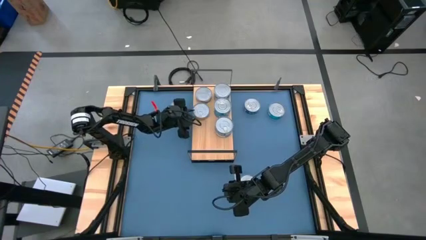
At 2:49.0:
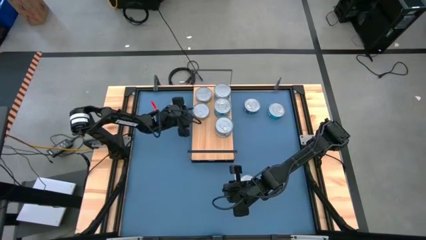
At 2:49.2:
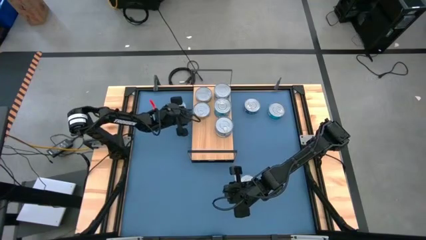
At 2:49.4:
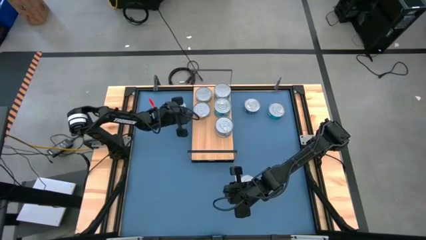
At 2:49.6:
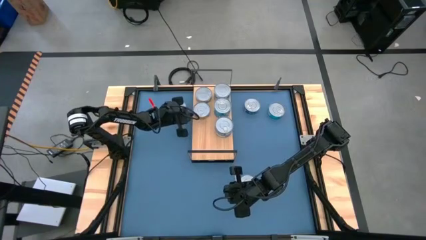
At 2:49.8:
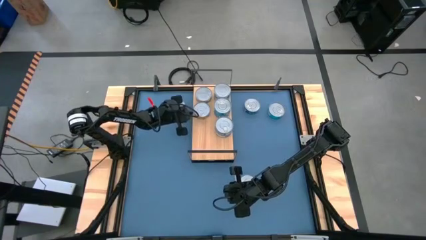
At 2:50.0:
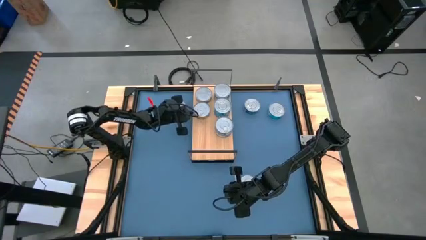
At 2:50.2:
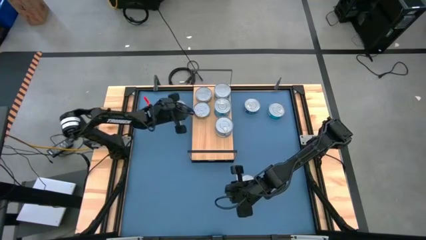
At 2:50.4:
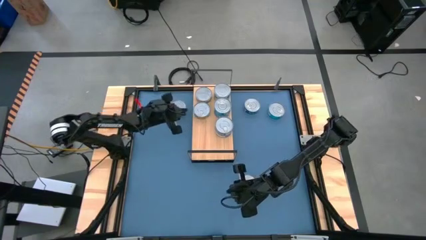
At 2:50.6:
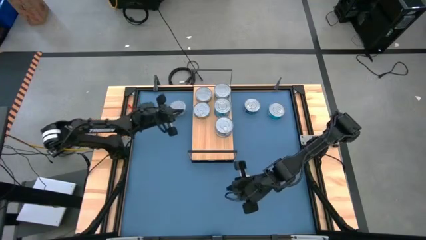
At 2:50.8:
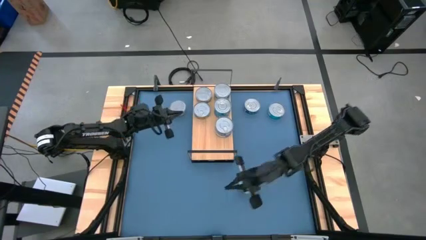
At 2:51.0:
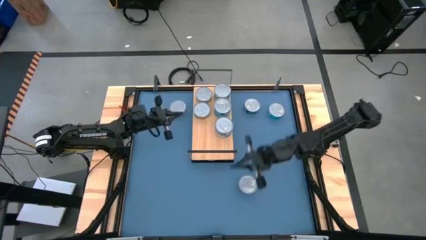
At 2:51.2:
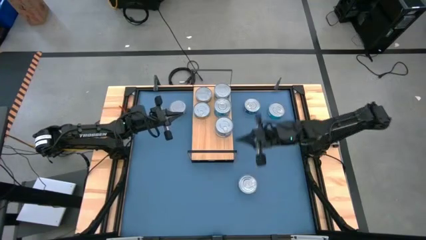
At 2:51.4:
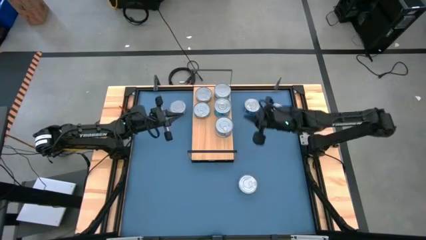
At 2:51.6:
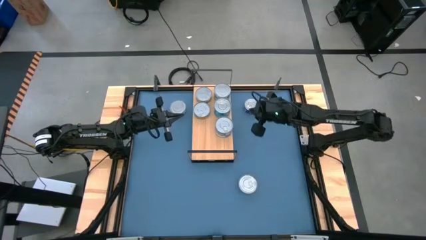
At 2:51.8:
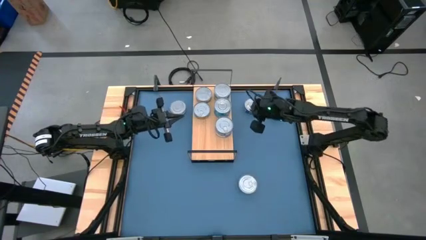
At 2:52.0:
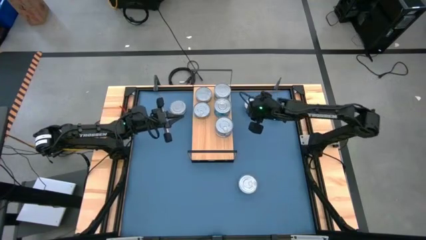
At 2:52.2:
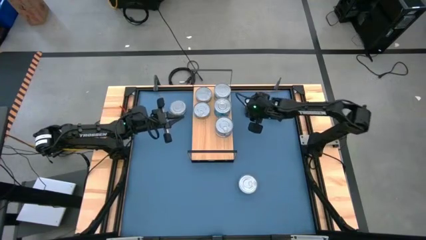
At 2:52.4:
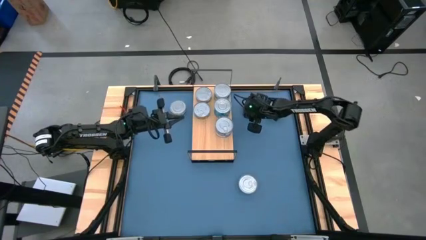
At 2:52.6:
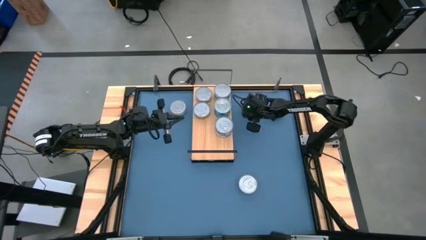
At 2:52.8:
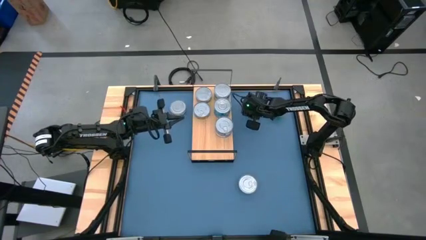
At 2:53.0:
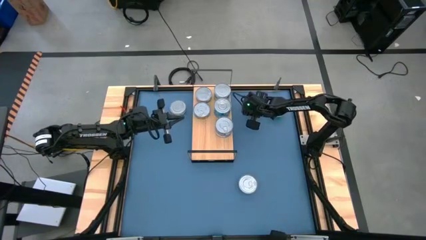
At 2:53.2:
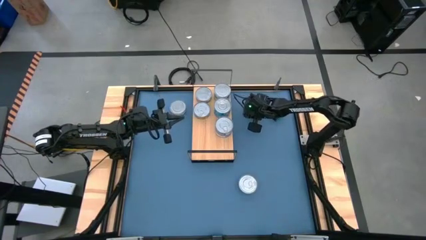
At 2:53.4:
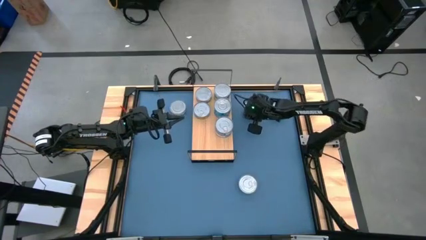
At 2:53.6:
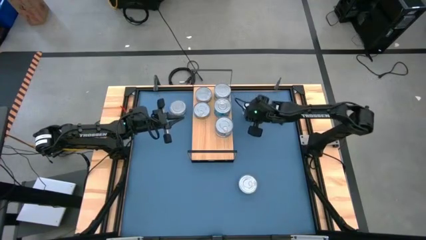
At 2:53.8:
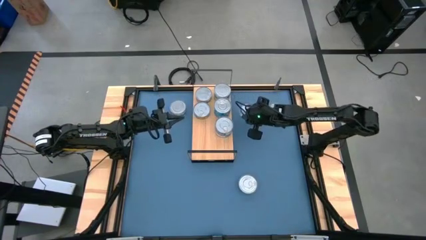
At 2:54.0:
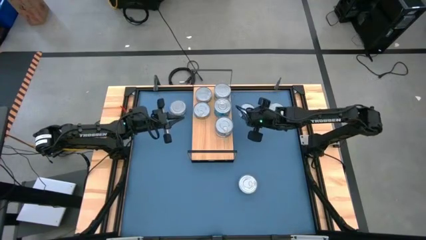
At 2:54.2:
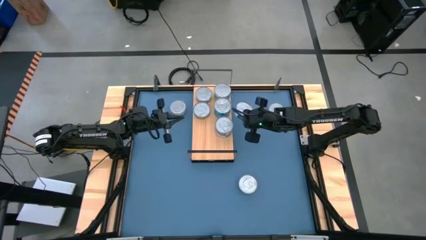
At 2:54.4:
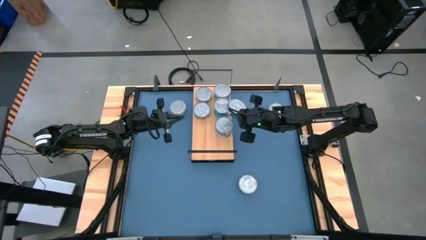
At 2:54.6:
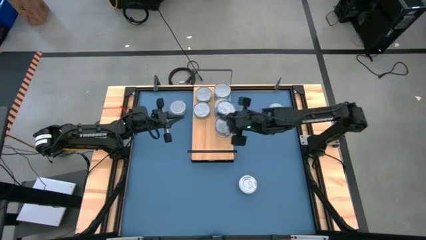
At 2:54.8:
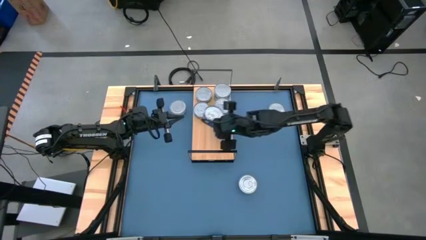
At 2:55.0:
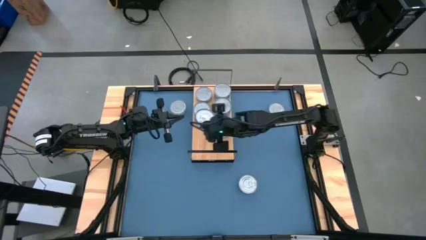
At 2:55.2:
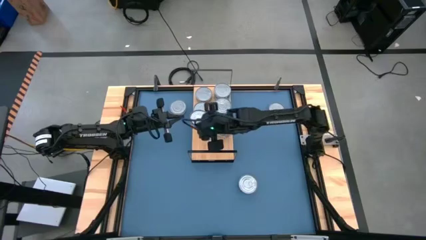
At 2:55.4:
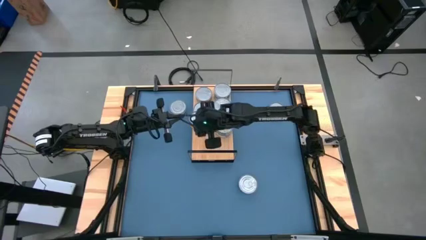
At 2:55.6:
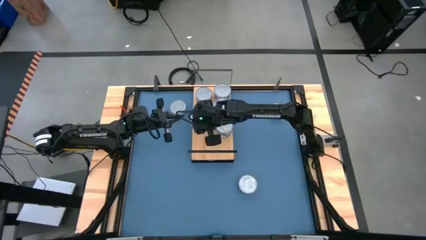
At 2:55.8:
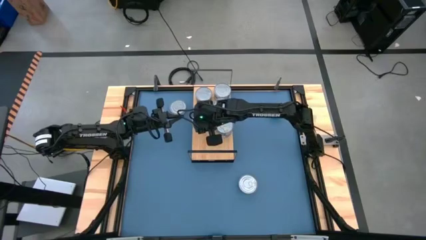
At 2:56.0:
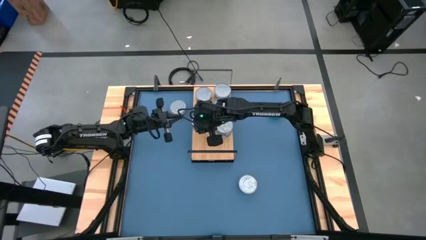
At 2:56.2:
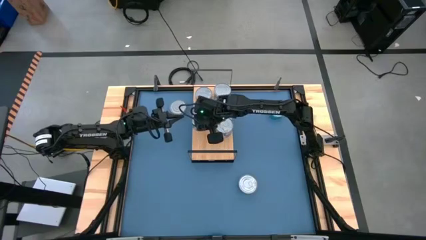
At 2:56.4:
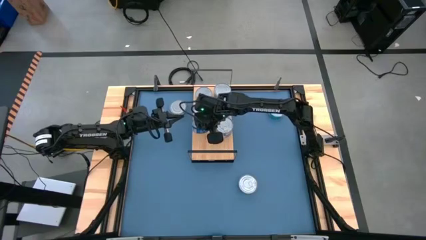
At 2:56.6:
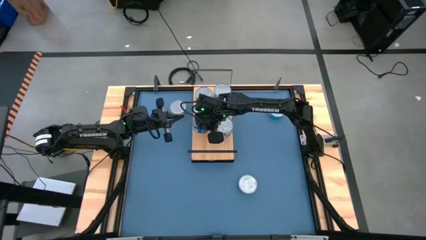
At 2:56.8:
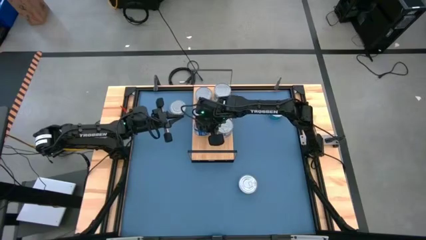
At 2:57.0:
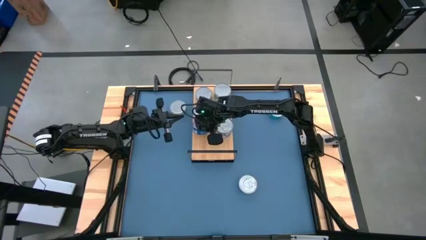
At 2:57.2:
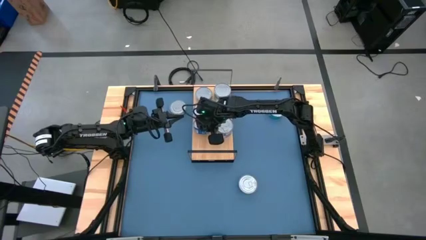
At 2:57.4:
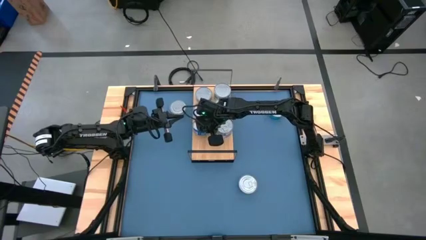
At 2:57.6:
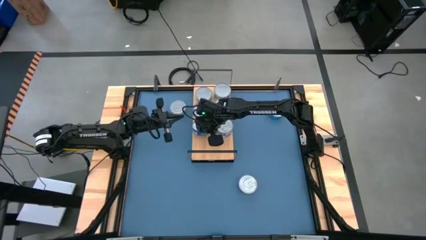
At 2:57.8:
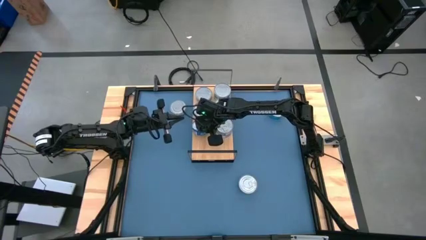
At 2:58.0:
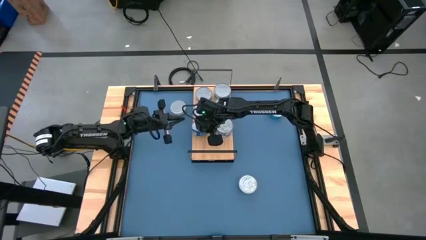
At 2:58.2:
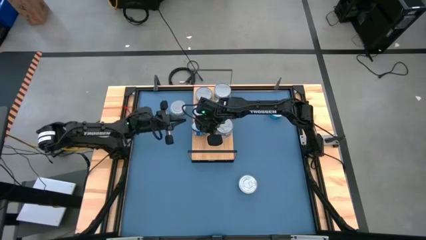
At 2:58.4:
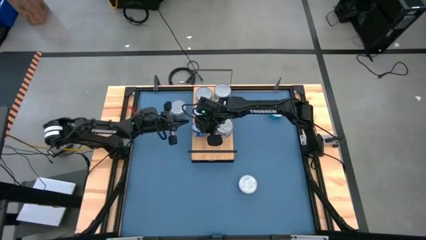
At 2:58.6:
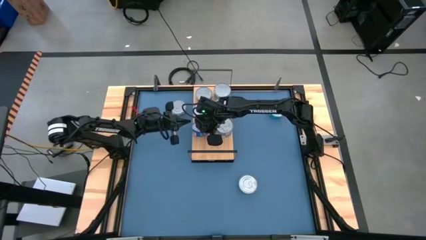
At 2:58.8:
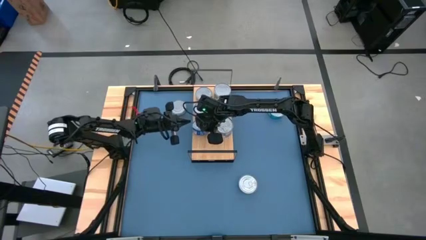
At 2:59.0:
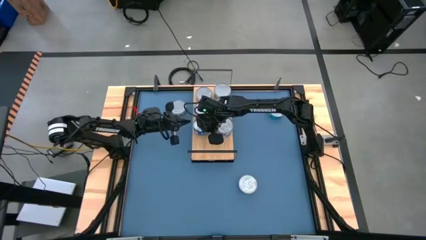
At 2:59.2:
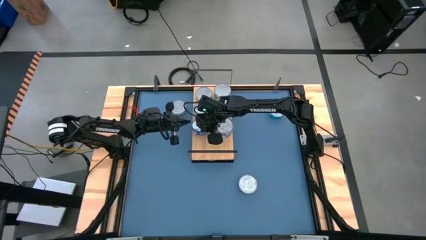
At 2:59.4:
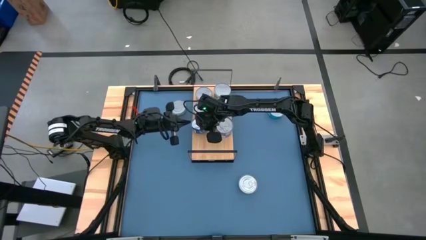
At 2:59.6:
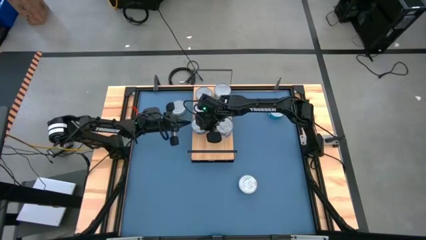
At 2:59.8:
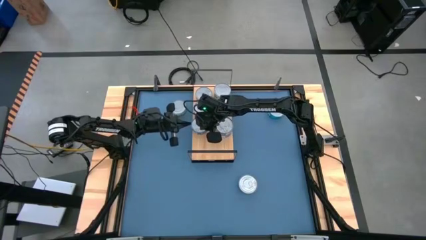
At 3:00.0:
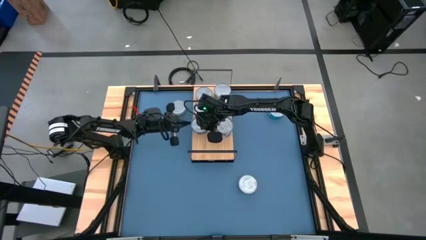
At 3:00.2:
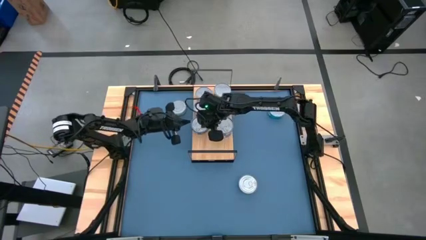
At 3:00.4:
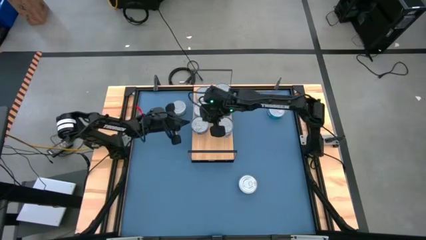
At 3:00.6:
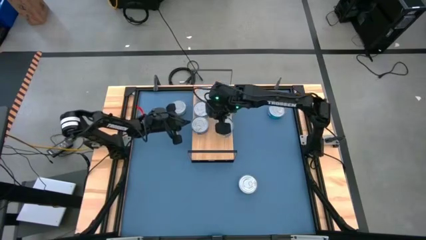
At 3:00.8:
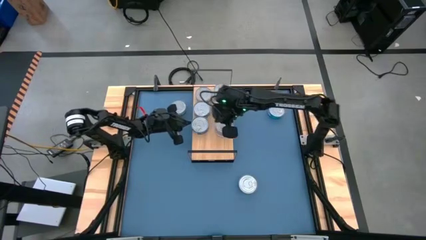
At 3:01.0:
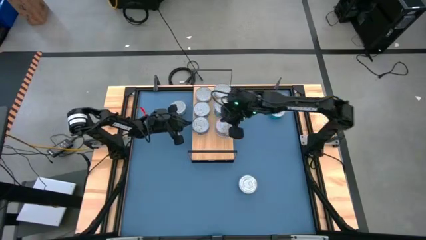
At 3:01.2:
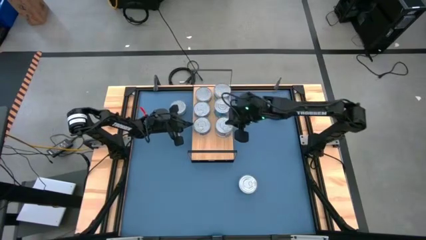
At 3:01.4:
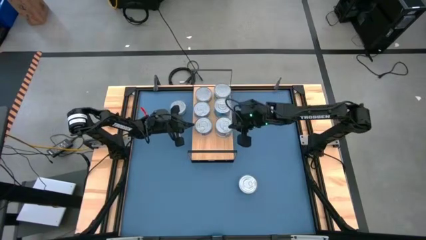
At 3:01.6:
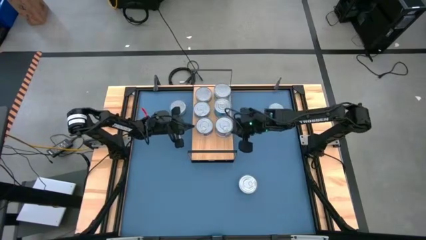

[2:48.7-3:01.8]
Task: Stack canned seafood by type on shelf
Put the blue tuna can on the shelf aligned with the other blue tuna can

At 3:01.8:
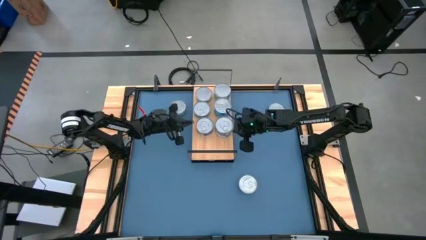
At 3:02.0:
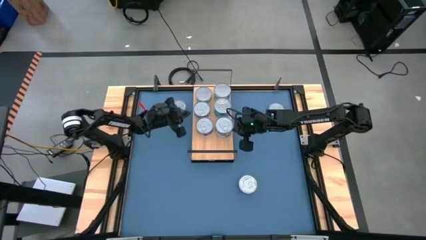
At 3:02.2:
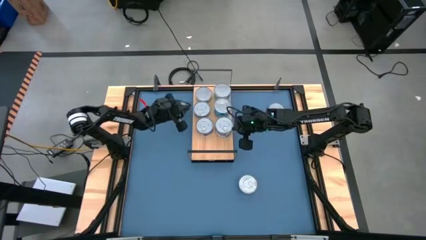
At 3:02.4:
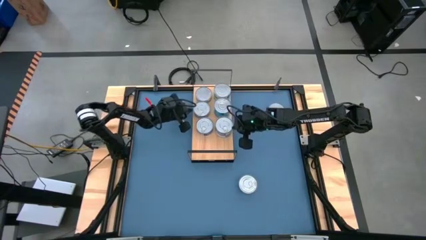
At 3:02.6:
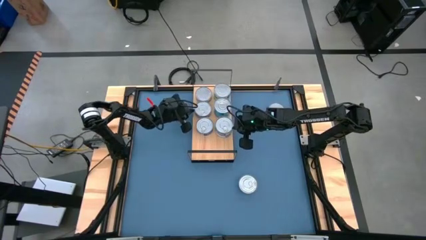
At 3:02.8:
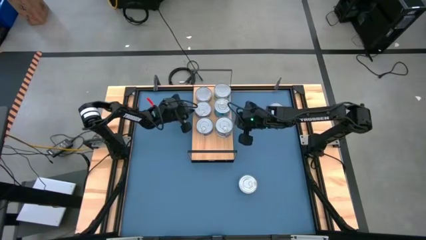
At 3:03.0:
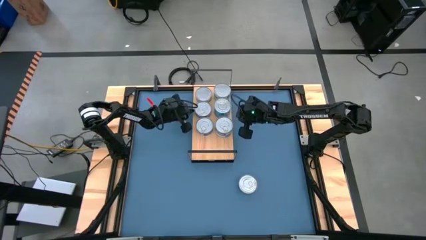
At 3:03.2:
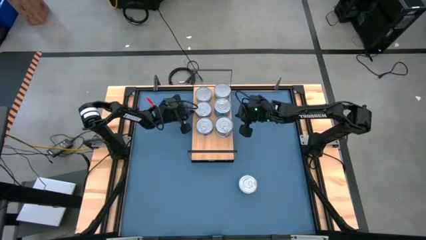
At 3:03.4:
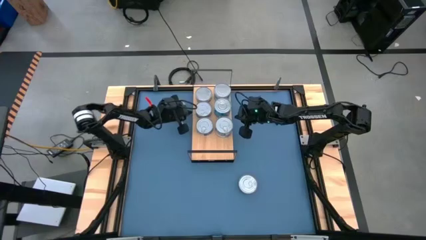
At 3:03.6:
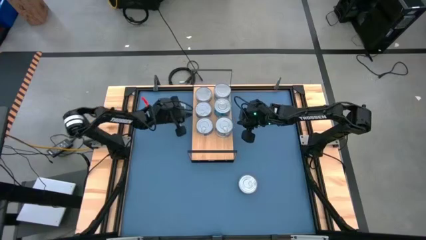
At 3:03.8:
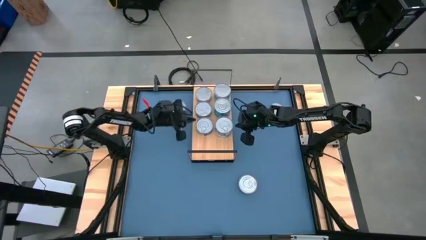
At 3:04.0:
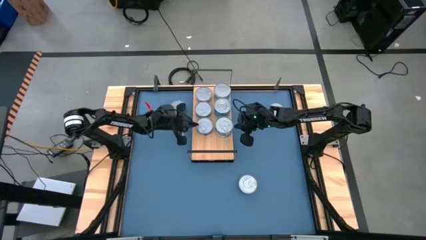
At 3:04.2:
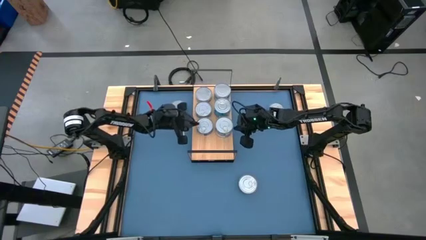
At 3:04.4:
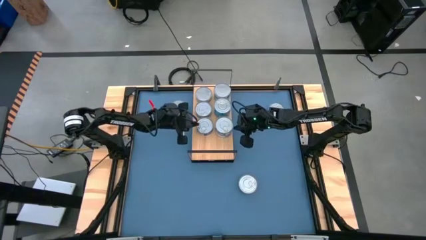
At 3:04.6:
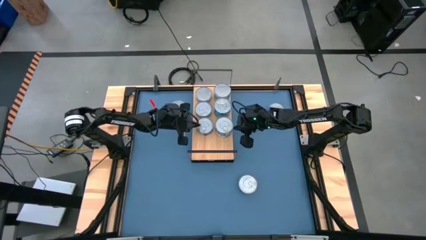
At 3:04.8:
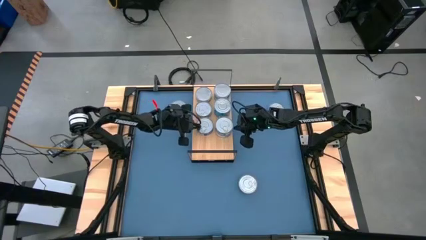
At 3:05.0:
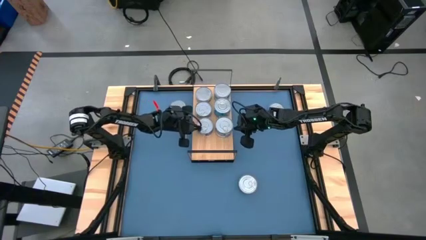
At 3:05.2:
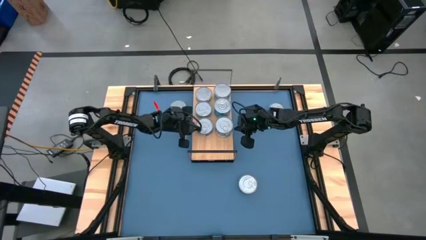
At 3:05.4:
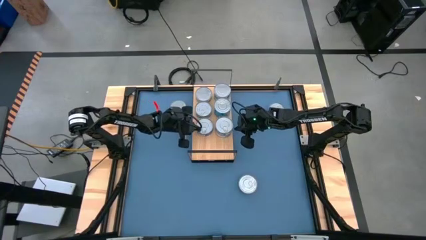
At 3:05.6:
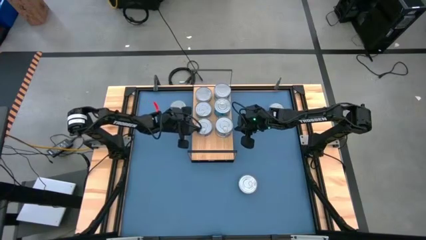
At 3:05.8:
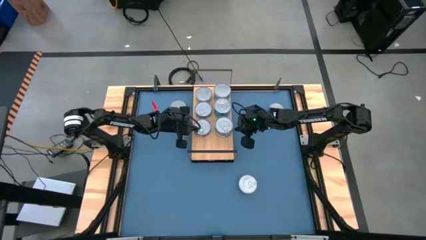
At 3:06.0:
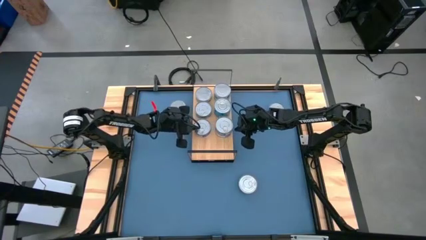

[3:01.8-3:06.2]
Adjust the yellow blue tuna can and blue tuna can on the shelf
